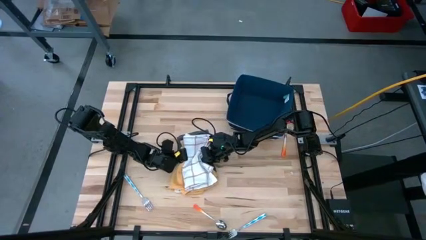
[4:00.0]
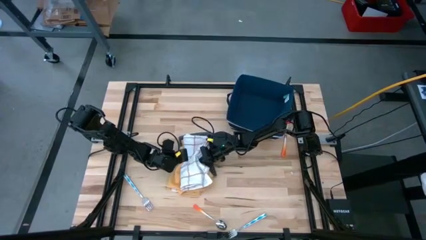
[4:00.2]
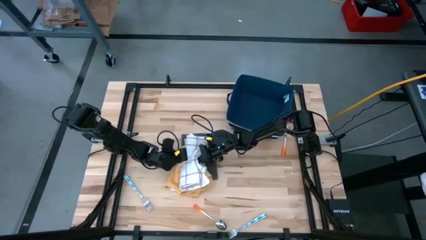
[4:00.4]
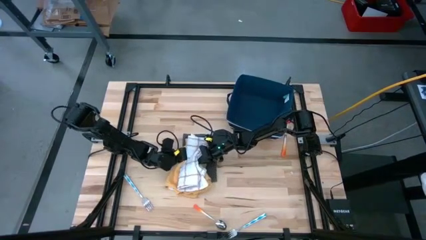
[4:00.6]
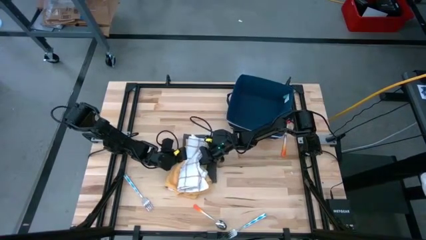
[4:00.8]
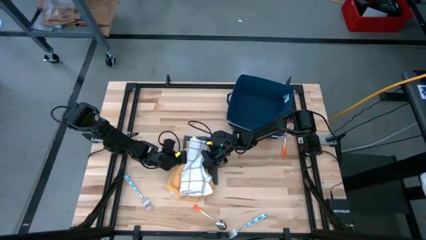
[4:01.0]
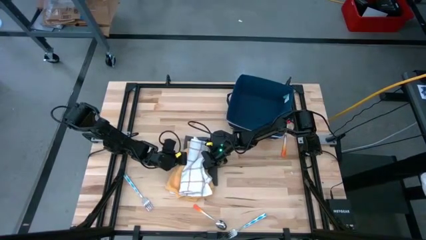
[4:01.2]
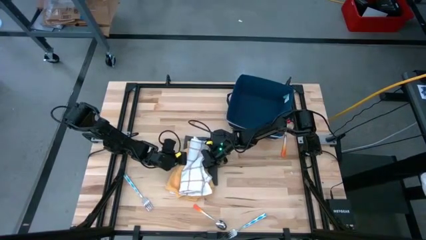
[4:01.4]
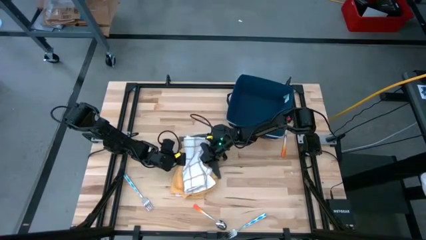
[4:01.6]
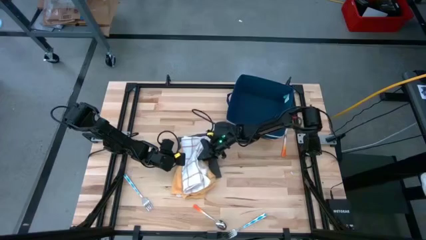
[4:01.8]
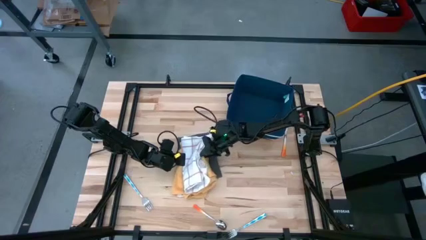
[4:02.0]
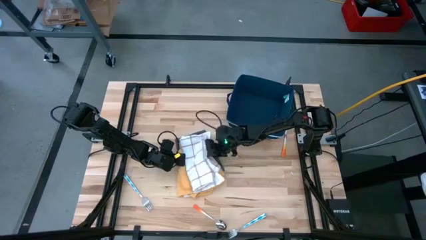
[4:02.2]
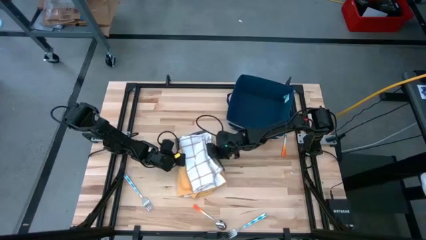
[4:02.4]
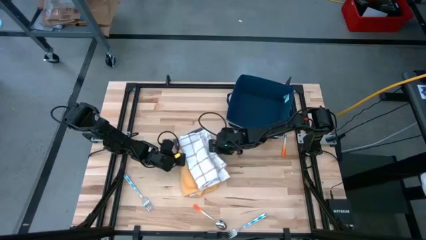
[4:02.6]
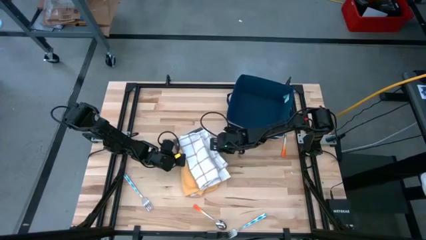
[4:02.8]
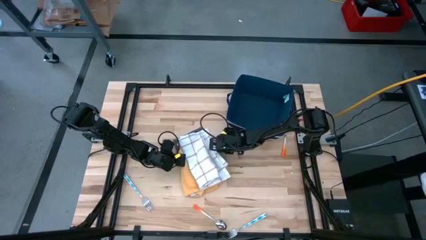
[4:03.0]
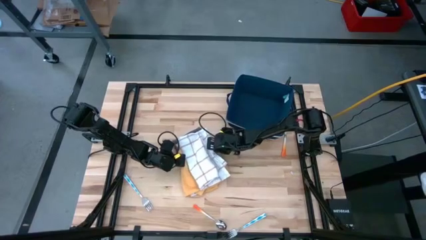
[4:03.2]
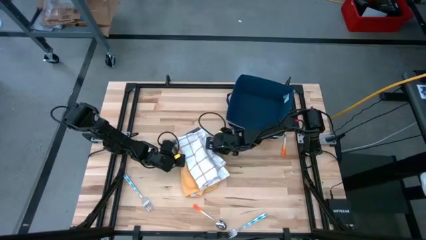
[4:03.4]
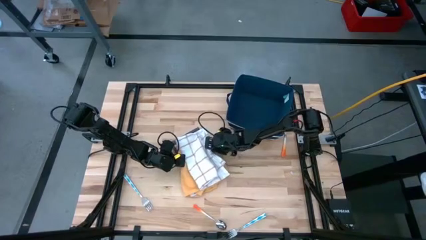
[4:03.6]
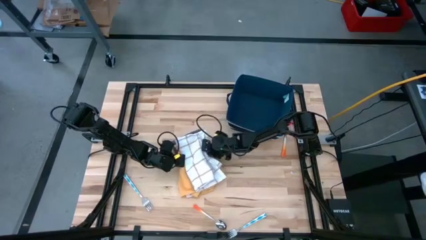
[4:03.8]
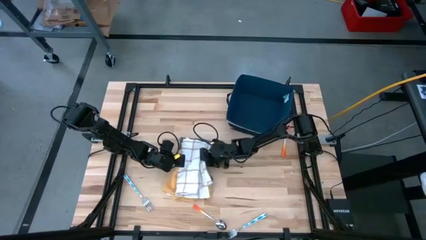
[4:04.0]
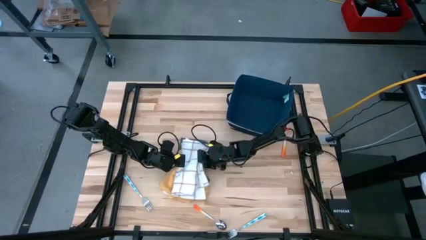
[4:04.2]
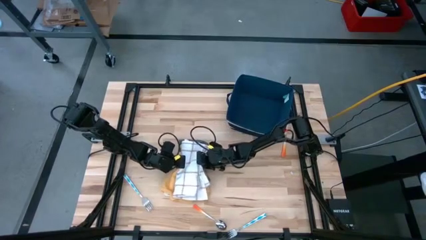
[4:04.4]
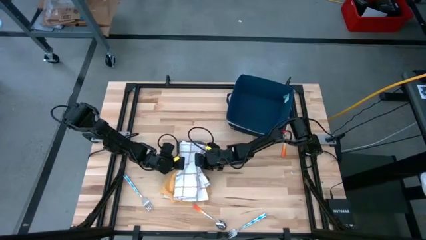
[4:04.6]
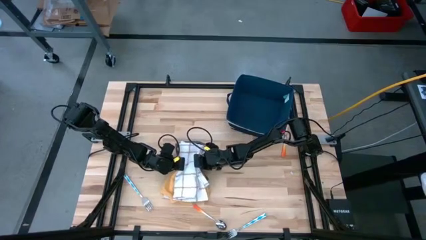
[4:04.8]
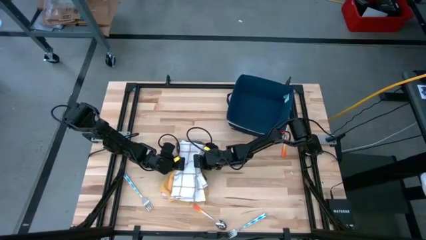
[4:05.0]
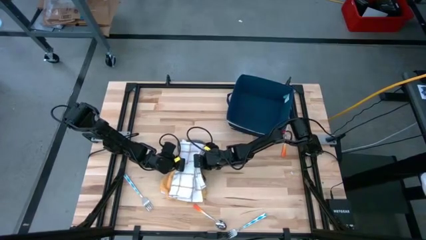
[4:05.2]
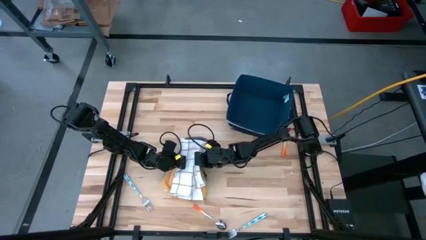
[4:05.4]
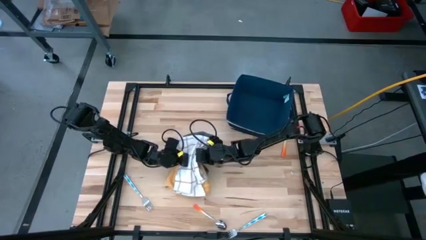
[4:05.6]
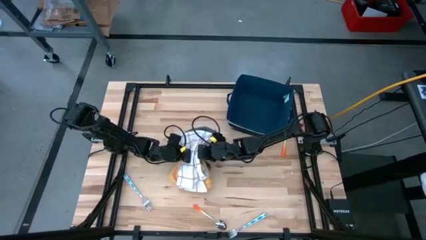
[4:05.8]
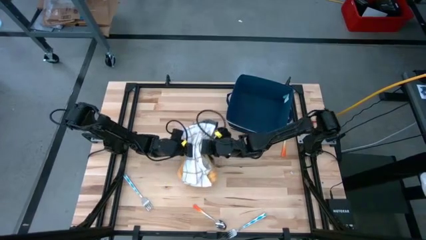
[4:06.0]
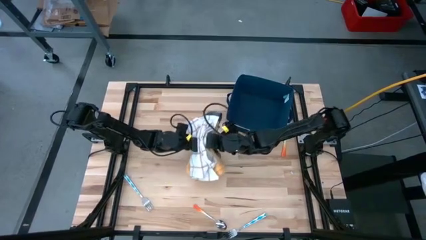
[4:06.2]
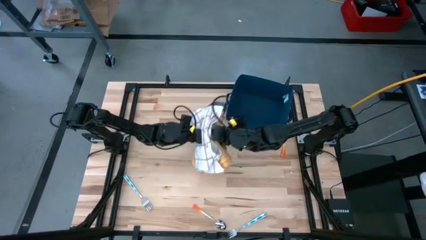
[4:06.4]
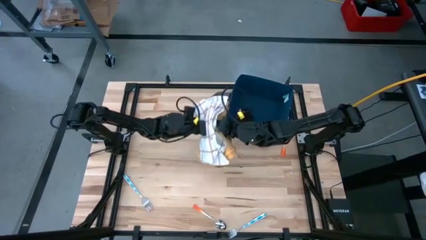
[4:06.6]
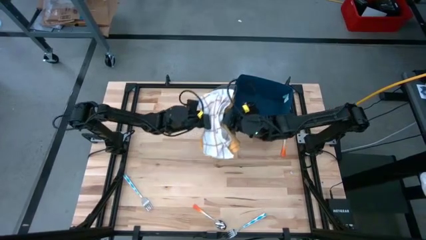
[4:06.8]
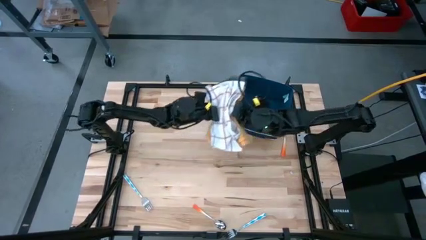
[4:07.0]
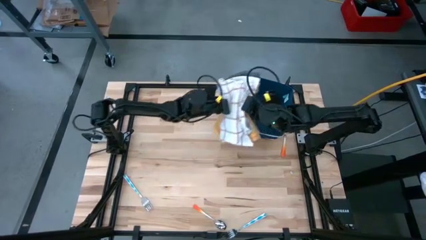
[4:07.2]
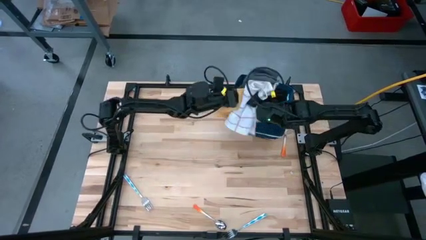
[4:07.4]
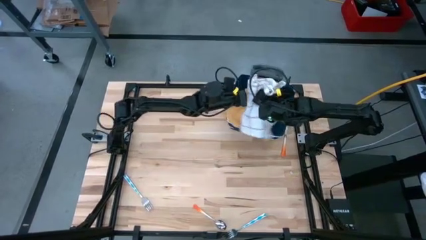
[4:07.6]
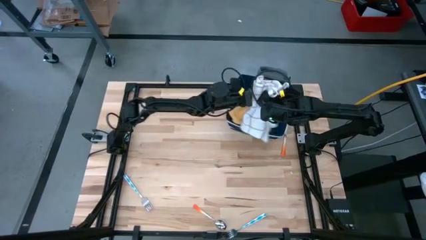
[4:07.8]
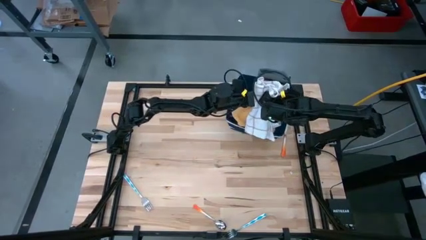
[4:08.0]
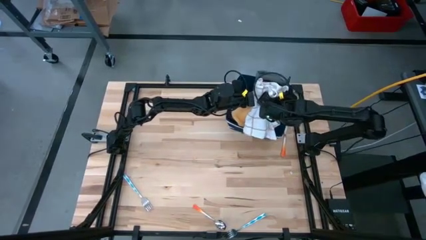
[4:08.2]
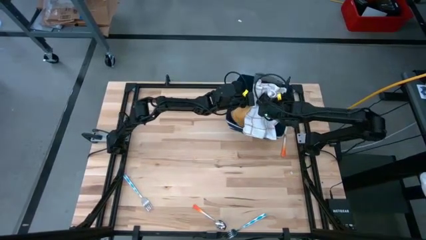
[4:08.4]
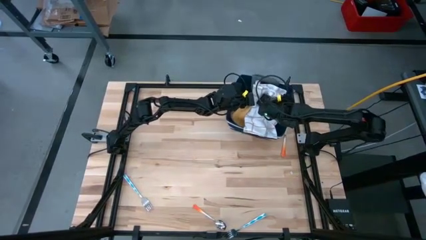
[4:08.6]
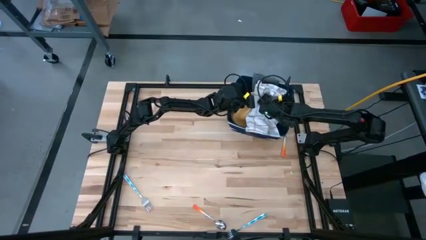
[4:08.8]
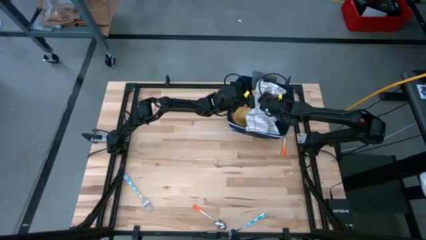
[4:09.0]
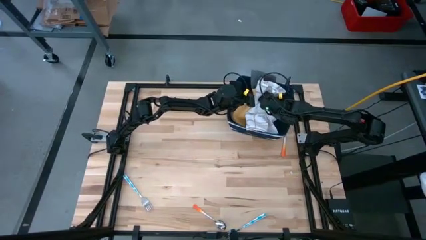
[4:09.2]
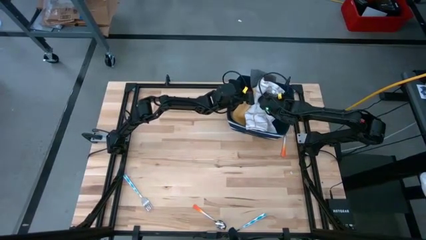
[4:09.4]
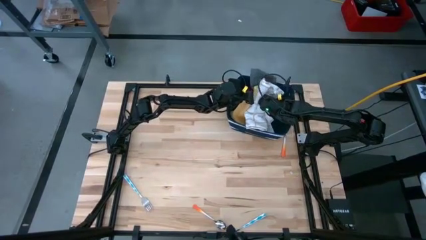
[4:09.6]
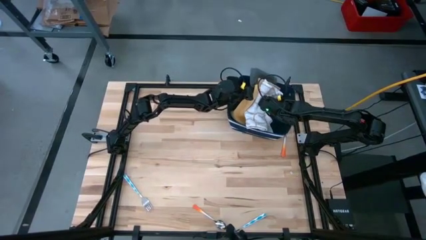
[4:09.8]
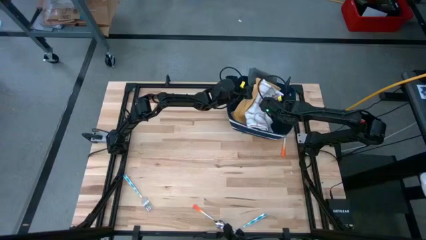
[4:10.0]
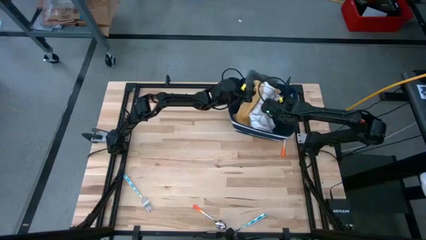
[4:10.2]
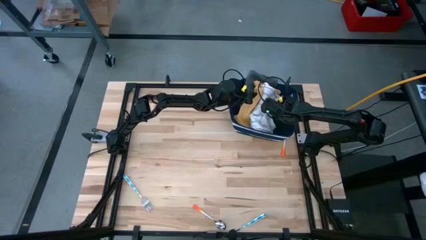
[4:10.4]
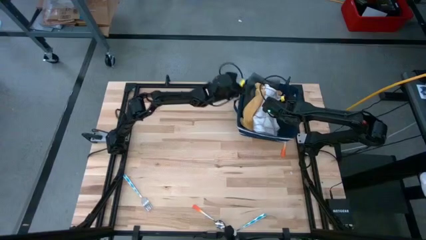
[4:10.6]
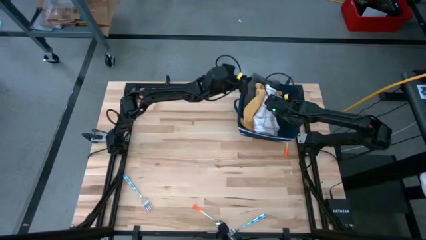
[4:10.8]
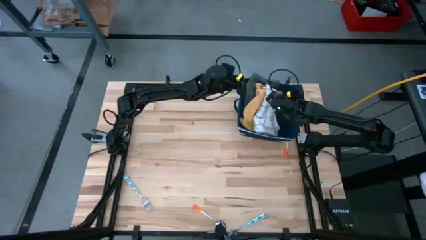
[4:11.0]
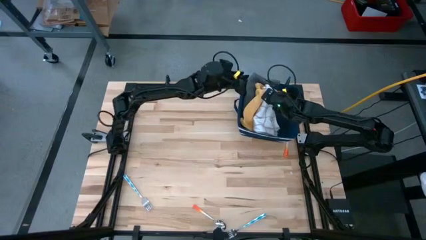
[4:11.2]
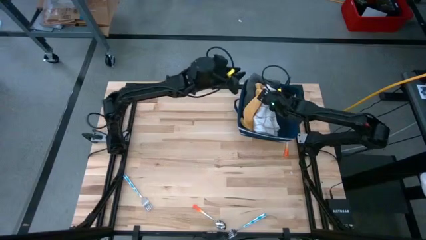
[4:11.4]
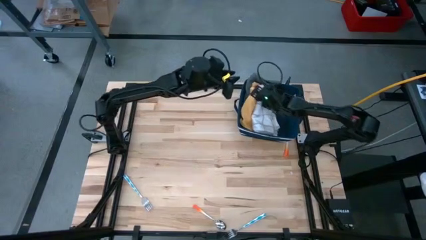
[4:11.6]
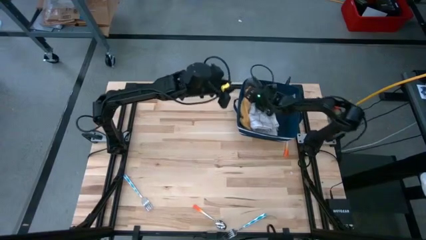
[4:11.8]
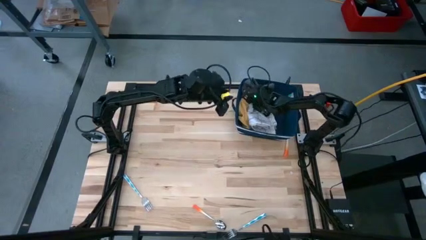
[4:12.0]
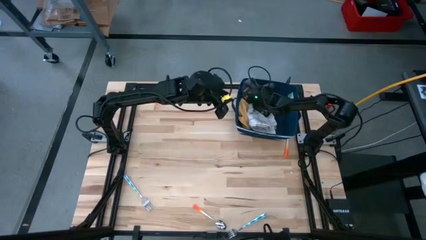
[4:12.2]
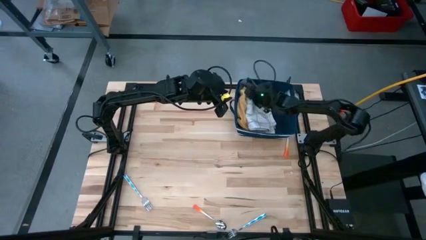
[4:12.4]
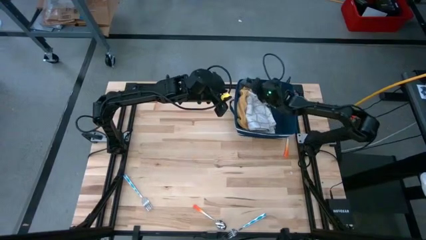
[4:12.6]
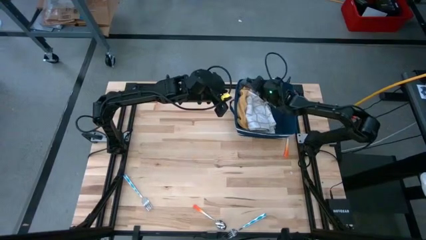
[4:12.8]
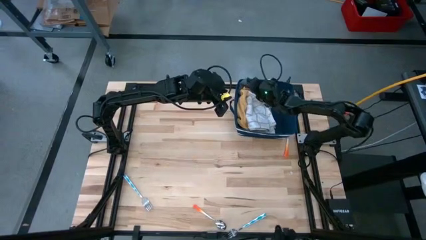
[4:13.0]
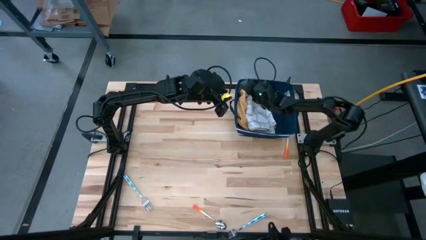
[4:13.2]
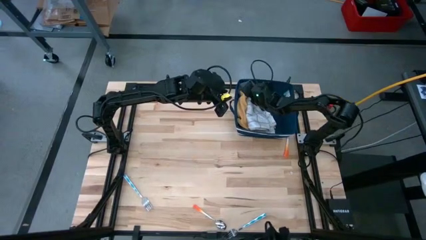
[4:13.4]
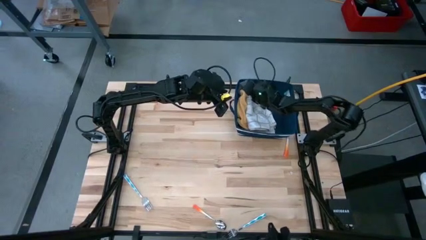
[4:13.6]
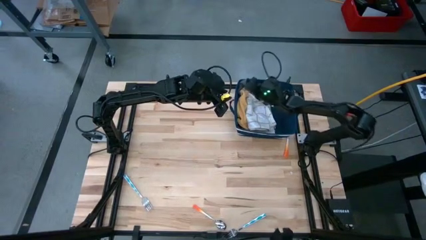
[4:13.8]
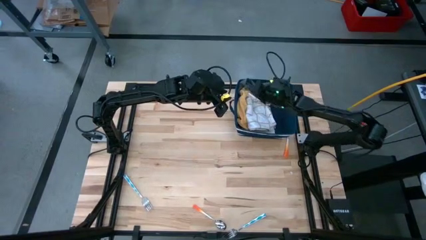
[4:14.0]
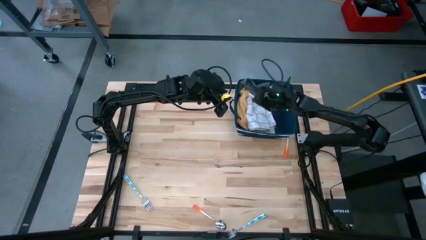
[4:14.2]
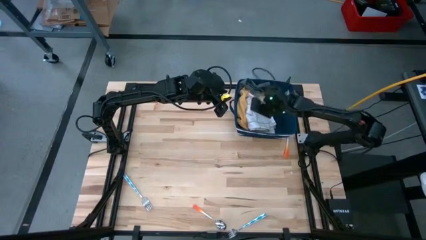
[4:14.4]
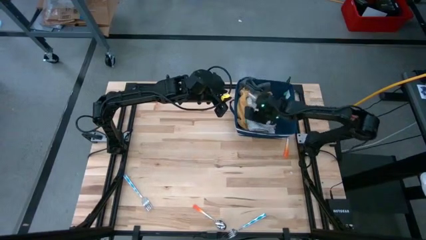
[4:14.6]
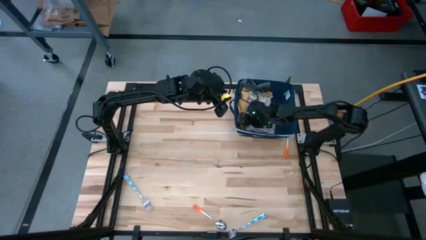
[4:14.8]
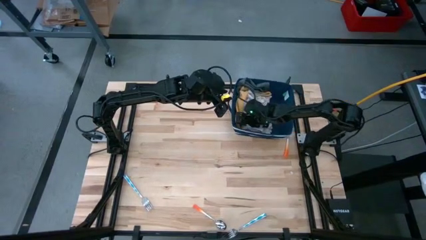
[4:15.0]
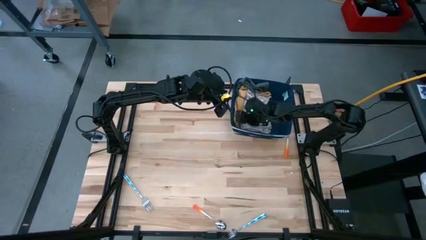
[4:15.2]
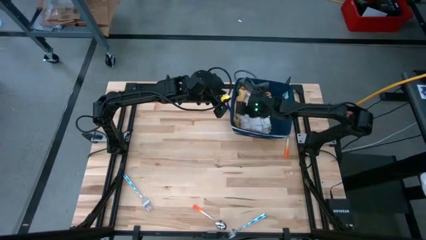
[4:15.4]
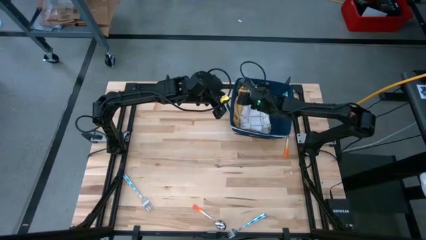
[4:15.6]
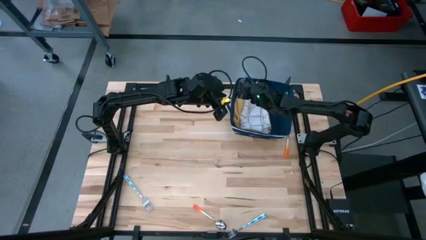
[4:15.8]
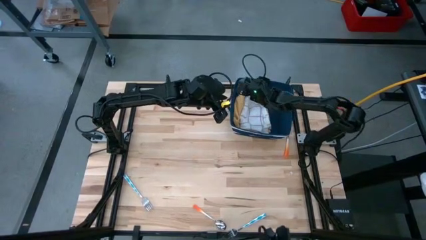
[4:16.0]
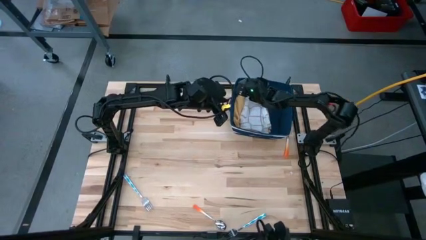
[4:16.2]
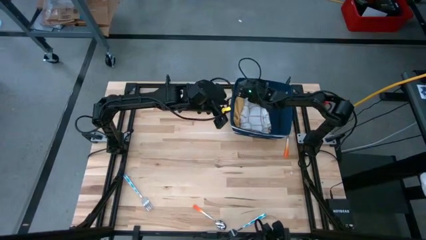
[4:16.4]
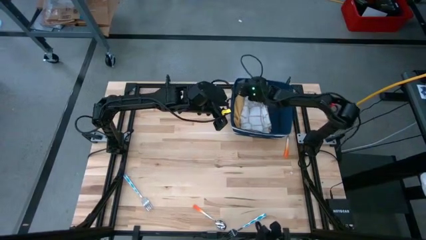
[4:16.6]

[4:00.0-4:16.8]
Task: Fold towel
Put the stacked towels into the blue bin
